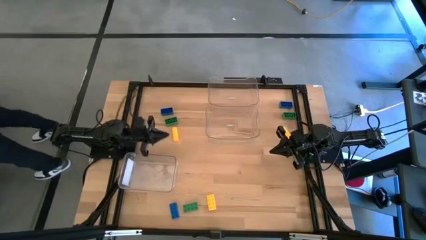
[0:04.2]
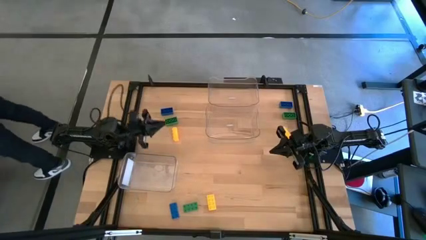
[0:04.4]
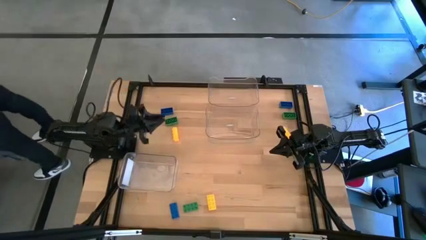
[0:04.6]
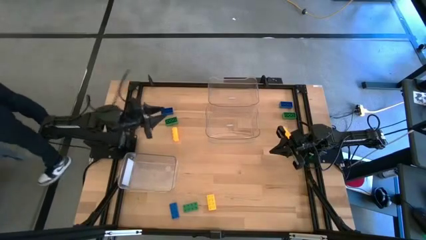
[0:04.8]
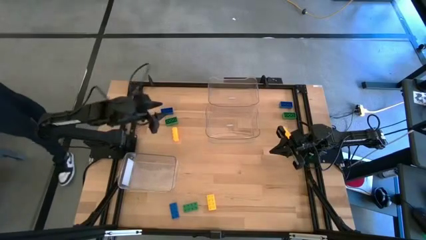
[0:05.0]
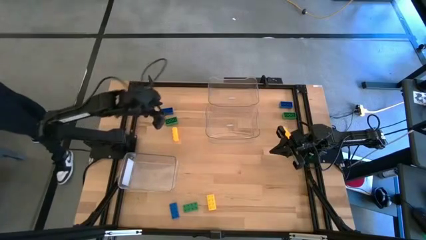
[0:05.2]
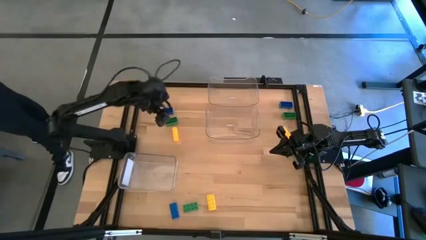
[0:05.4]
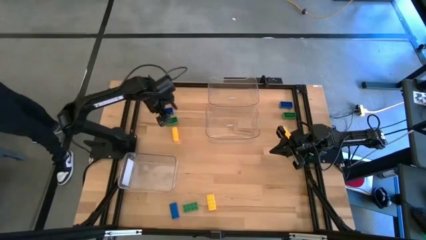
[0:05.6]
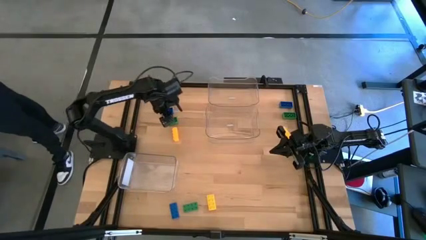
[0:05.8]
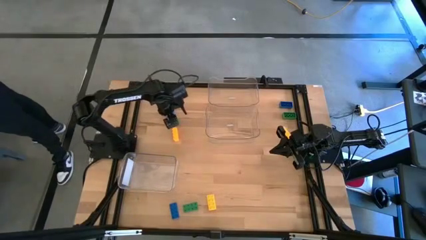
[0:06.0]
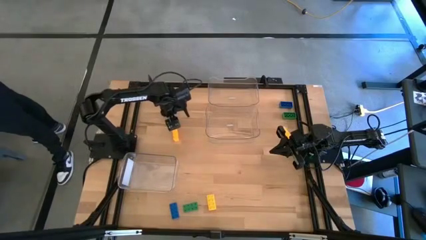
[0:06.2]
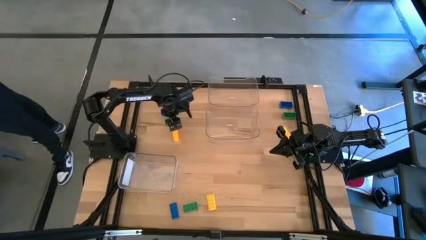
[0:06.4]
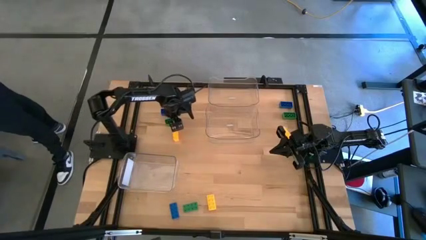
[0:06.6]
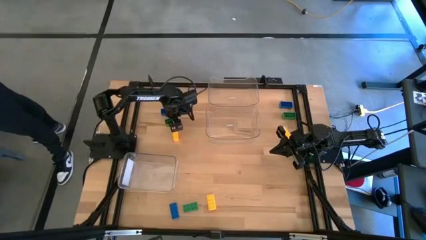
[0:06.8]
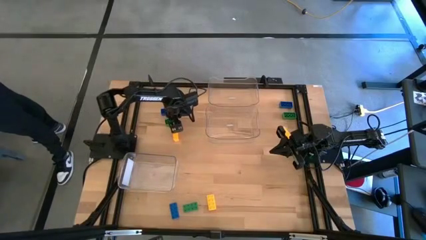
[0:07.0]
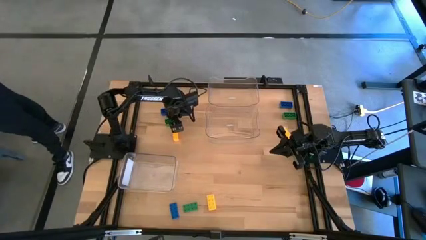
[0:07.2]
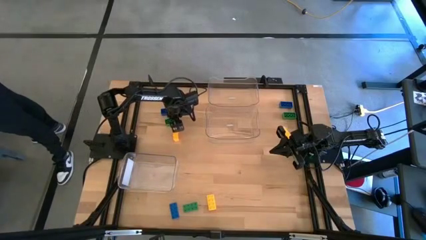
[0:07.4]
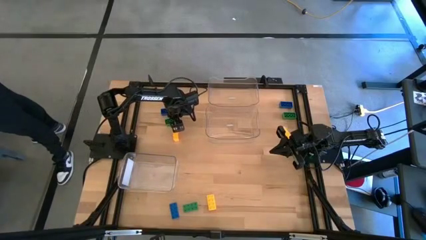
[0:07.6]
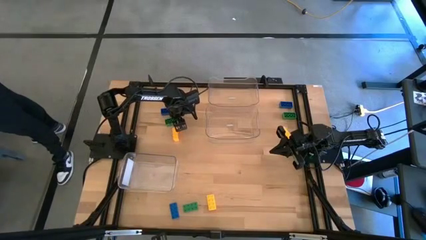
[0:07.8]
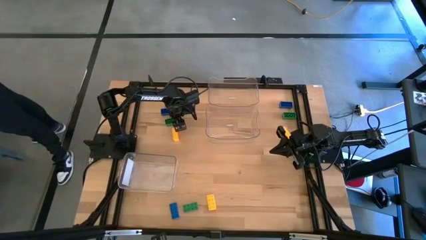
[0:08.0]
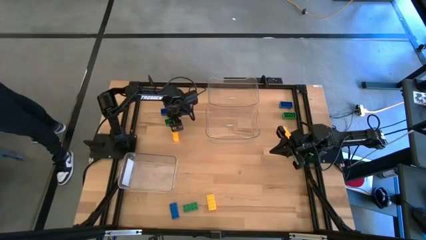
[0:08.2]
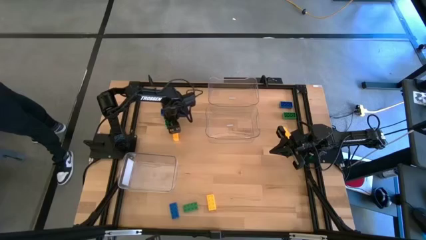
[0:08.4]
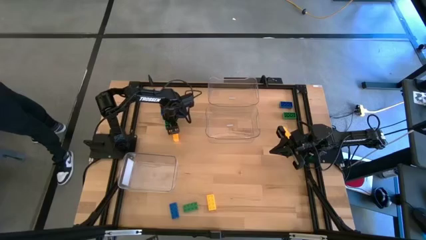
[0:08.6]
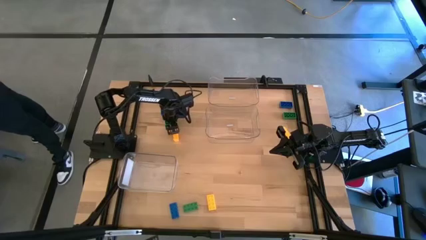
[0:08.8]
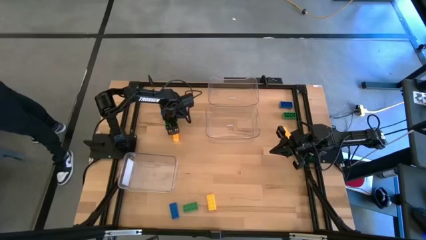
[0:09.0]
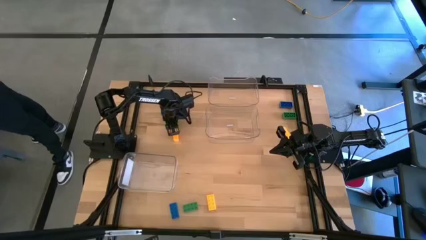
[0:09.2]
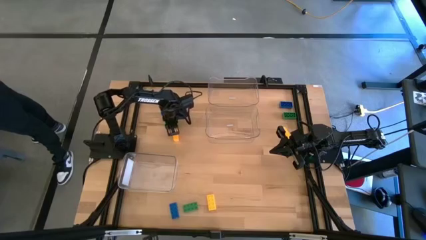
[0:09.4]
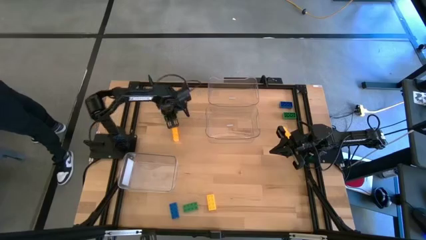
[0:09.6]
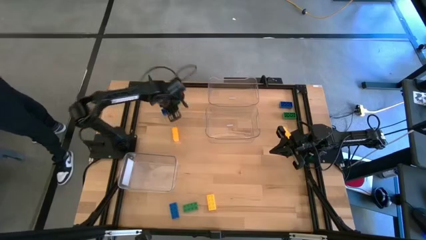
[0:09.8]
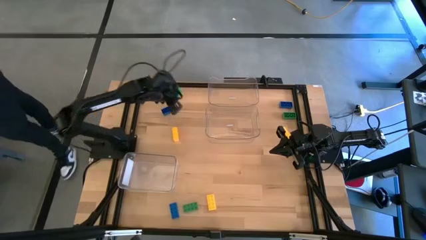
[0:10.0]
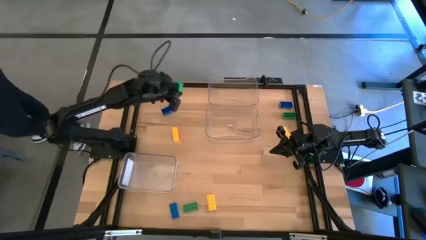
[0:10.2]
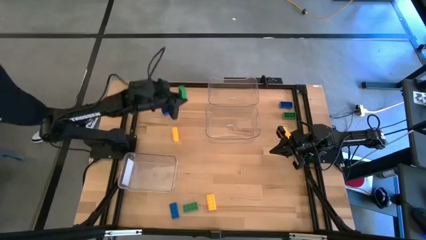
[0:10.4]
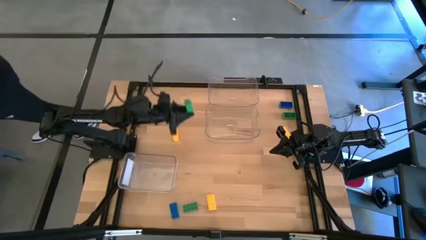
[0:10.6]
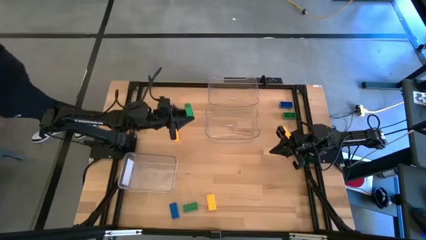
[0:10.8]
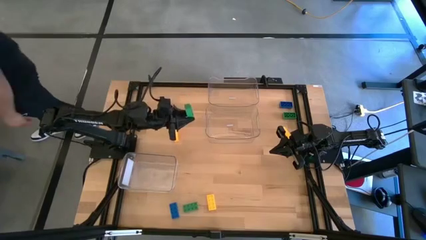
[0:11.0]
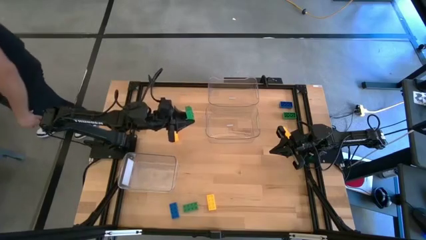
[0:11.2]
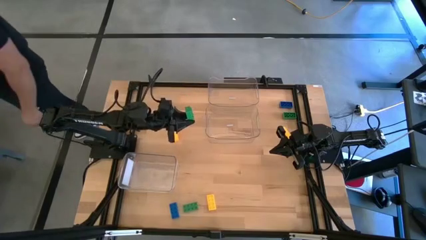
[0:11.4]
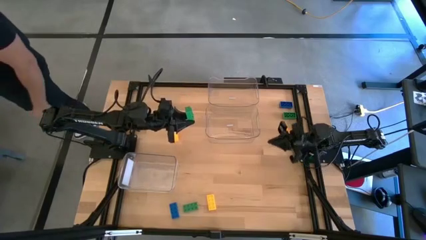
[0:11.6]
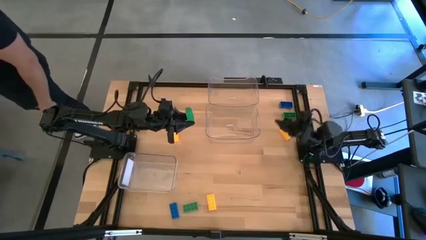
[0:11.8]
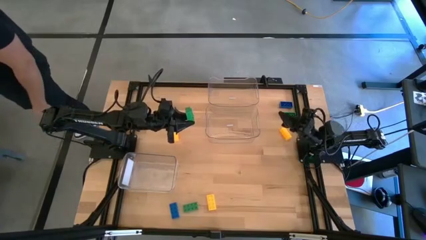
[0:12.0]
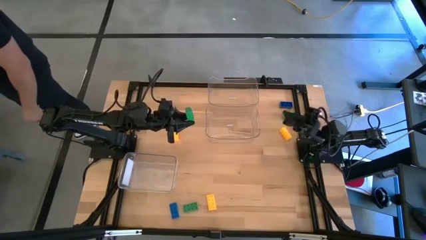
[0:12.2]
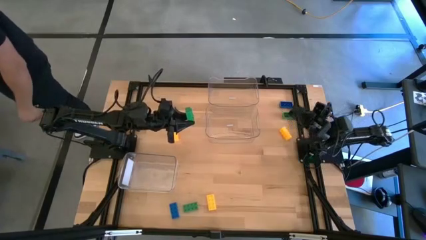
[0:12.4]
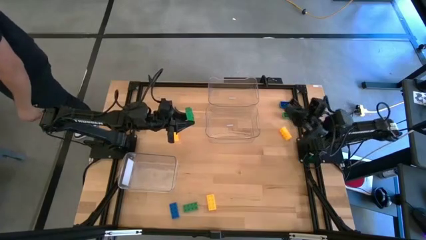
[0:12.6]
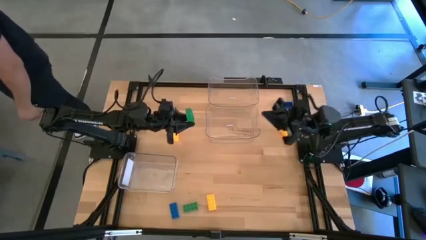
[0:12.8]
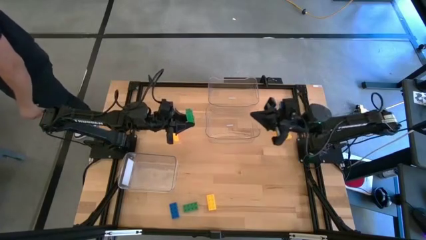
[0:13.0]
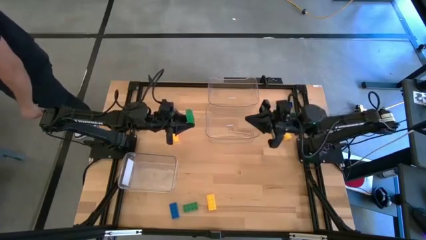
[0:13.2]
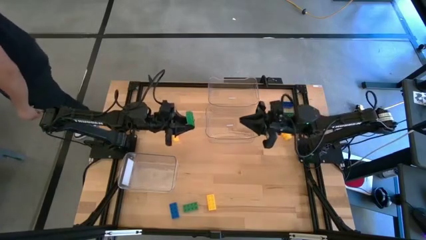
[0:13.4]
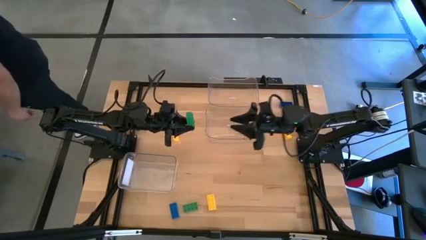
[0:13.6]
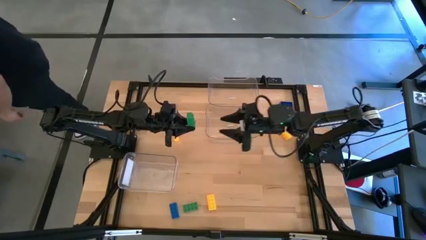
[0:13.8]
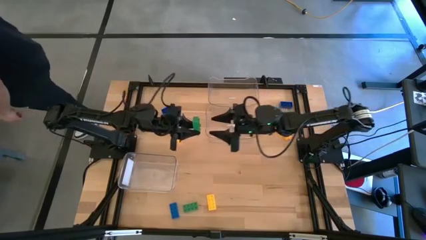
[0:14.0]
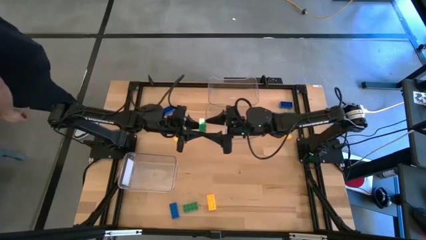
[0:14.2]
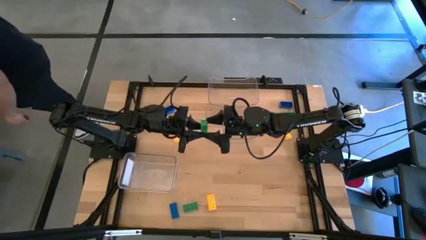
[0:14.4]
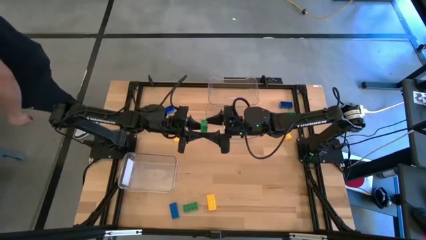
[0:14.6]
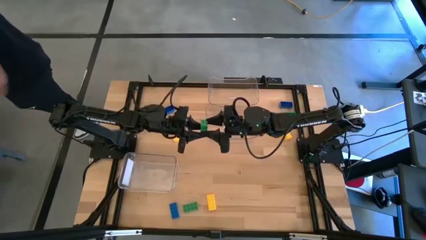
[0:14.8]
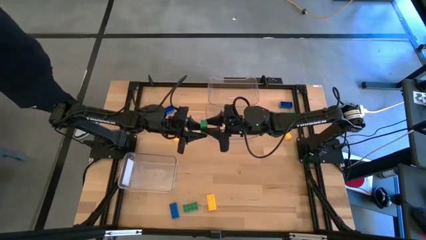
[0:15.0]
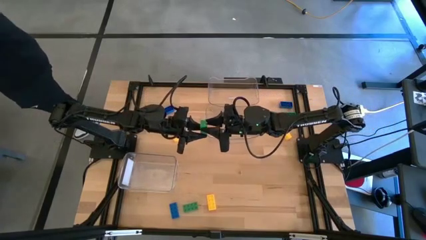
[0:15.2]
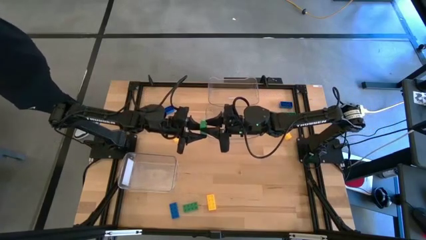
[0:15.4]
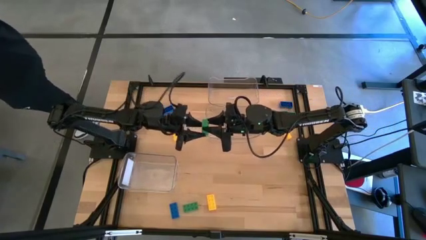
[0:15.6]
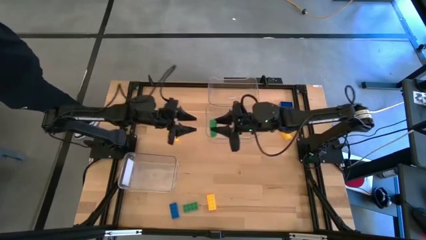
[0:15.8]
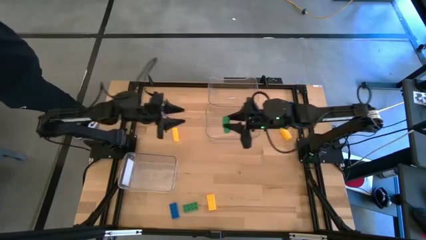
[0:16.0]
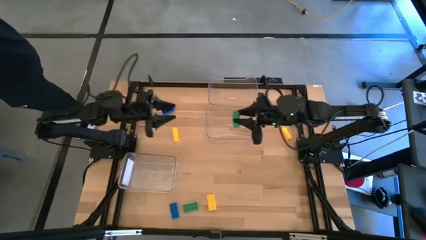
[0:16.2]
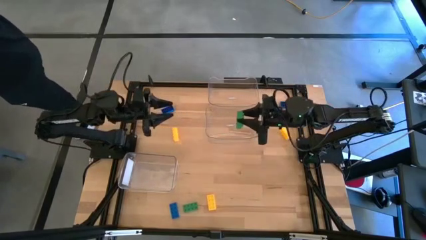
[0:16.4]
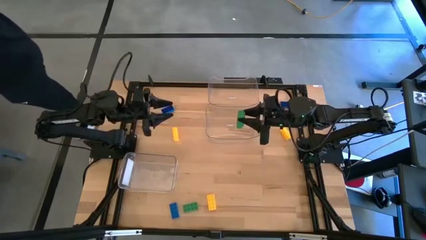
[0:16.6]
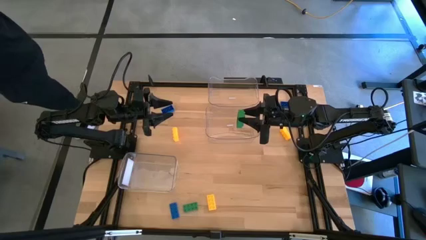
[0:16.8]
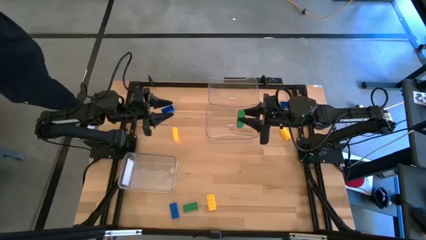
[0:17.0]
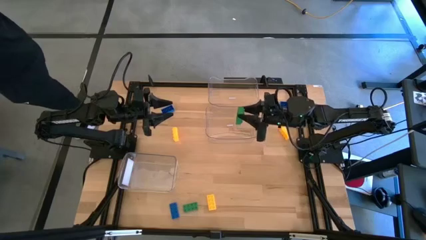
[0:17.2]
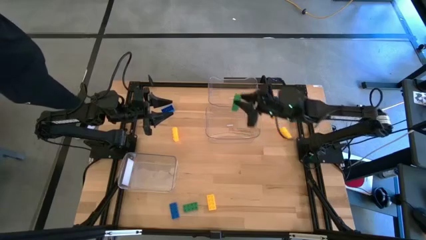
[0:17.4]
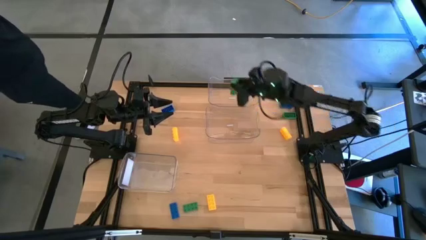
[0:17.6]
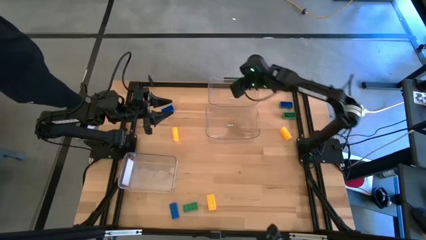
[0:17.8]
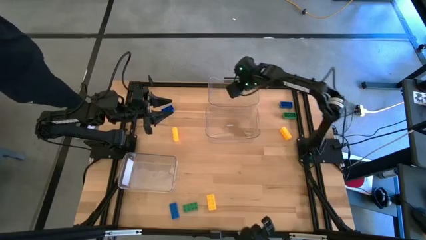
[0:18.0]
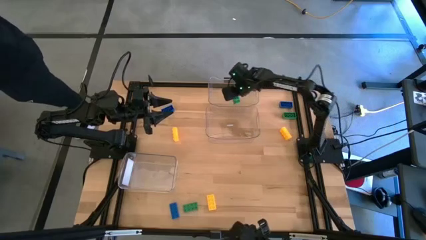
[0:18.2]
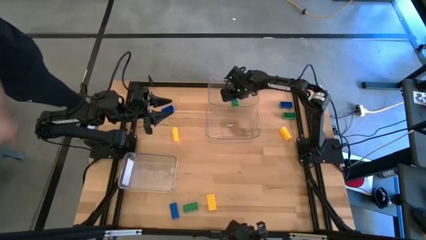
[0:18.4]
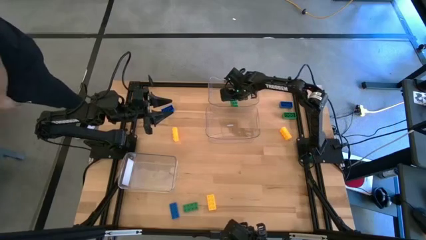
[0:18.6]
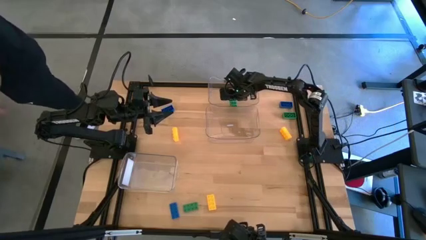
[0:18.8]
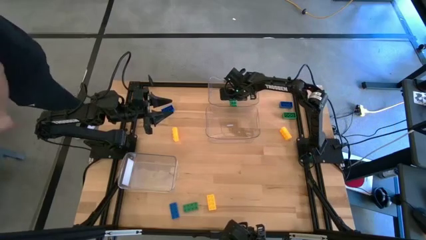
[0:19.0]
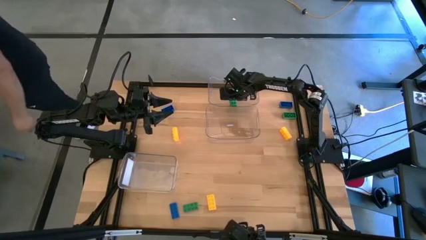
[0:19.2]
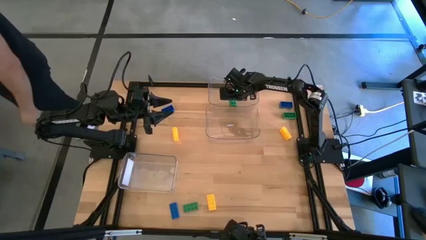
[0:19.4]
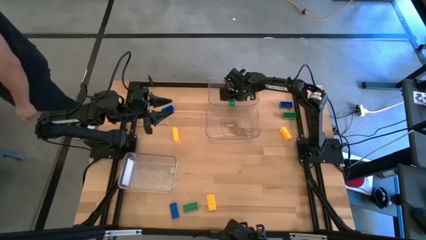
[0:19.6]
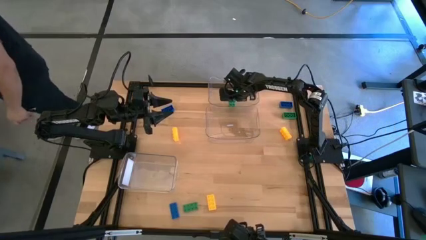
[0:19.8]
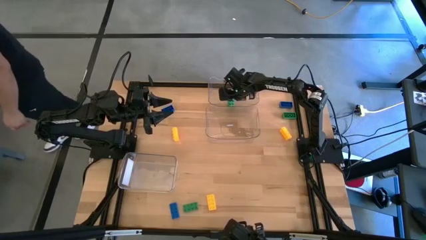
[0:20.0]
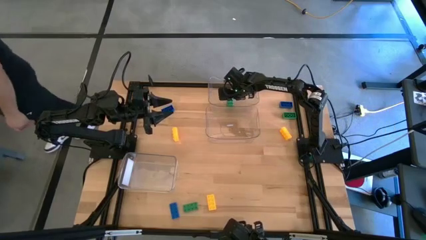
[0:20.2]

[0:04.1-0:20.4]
Task: Sort & place blocks by color
Put the top left green game piece into the top transparent bin
